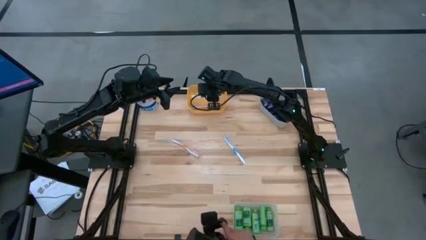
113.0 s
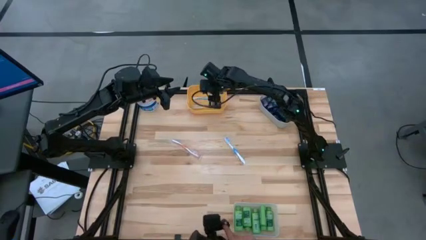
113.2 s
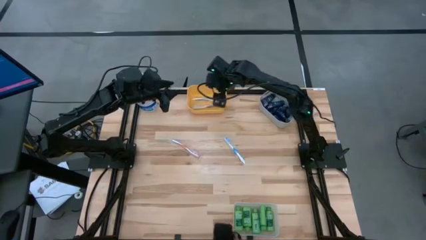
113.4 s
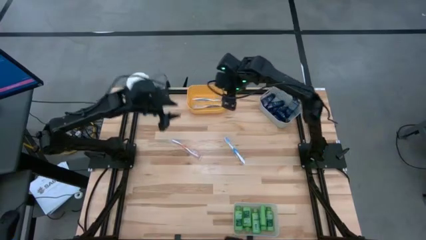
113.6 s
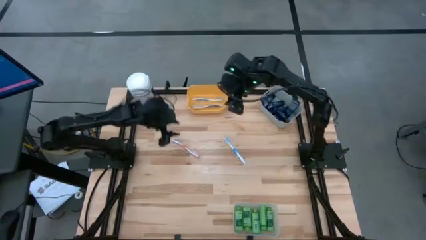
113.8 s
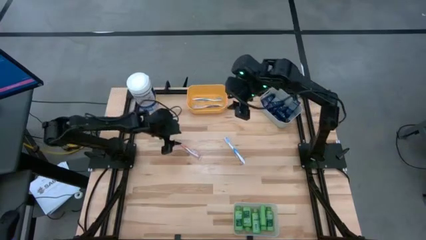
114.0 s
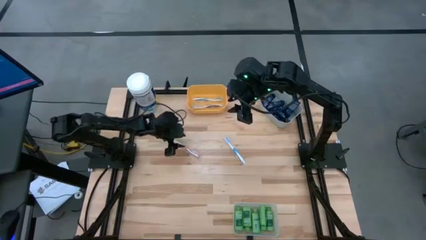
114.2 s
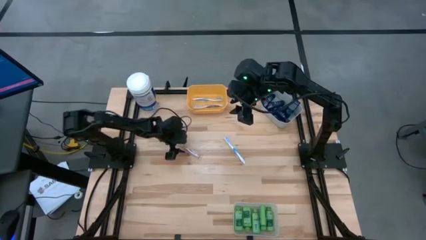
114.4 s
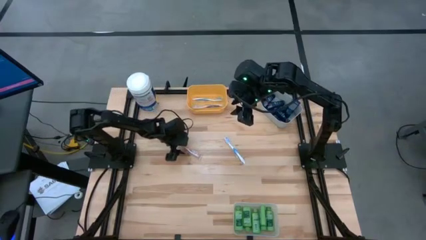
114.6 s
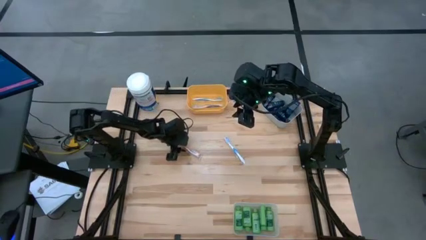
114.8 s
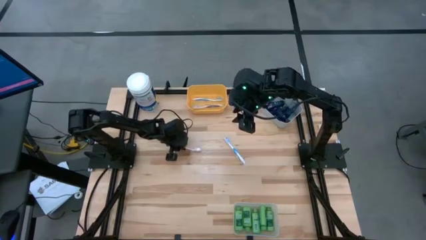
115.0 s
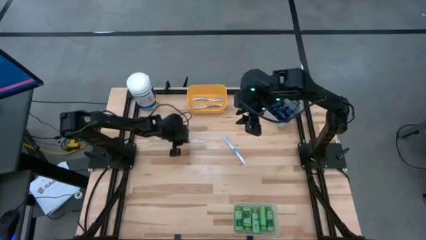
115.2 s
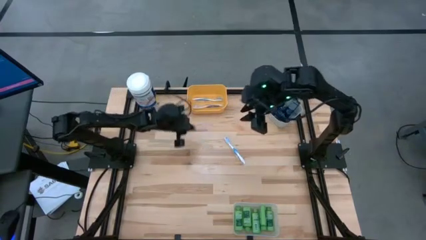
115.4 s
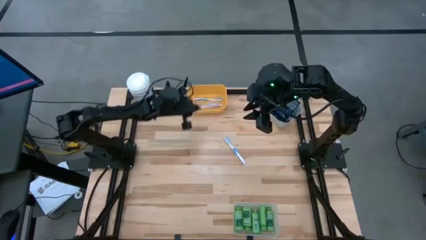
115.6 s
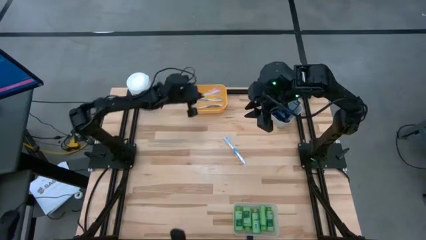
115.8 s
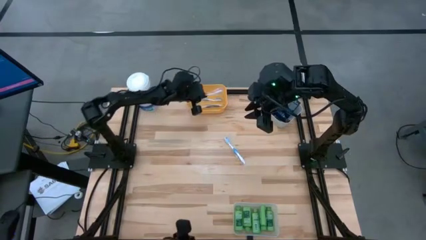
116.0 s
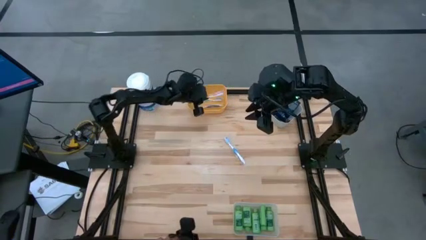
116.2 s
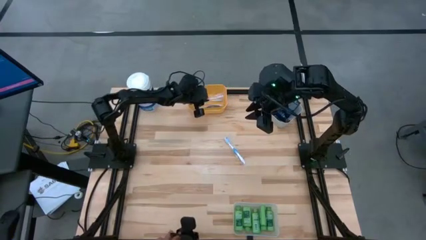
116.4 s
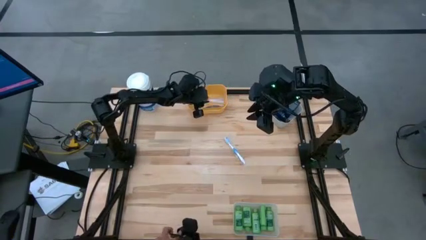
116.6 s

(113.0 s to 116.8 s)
Task: Pick & Place Travel size toiletries
Put the orange toothbrush into the yellow bin

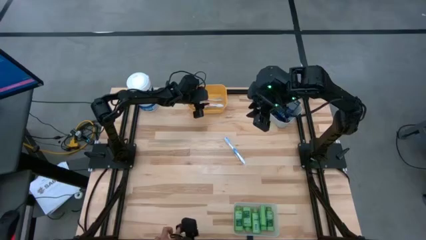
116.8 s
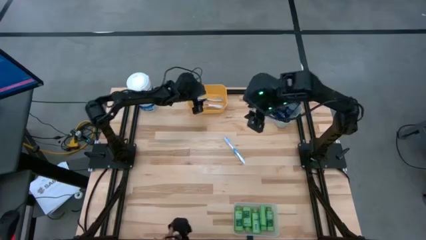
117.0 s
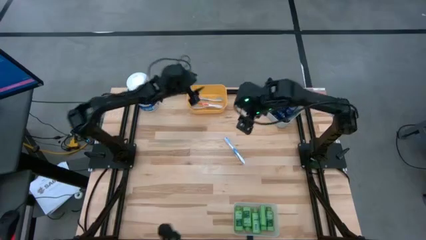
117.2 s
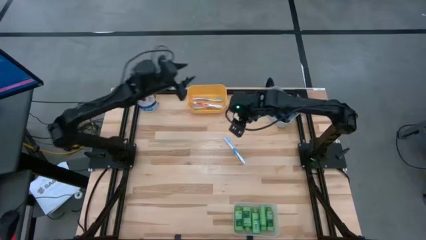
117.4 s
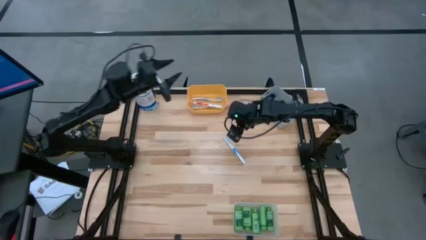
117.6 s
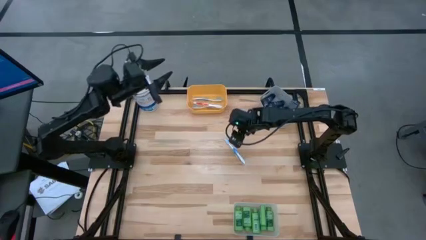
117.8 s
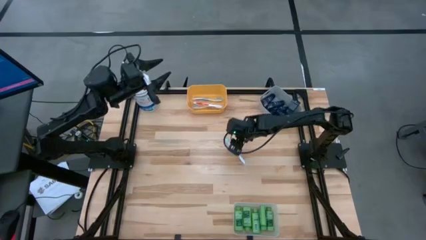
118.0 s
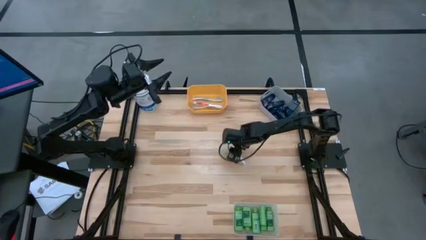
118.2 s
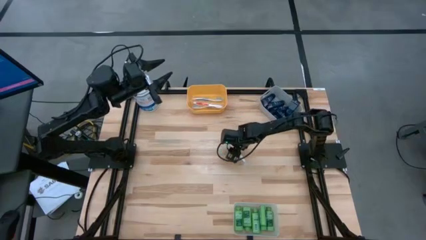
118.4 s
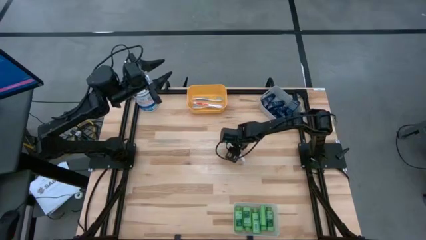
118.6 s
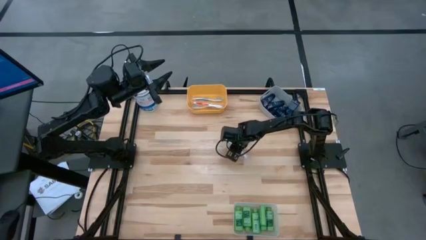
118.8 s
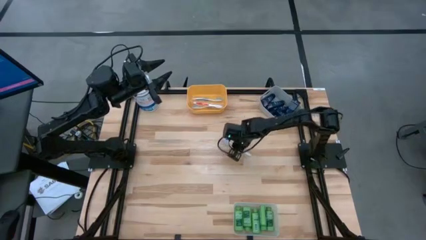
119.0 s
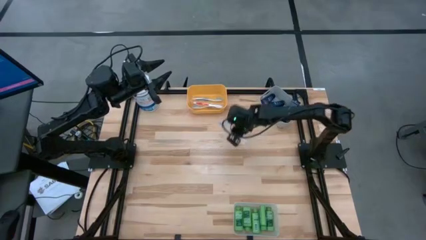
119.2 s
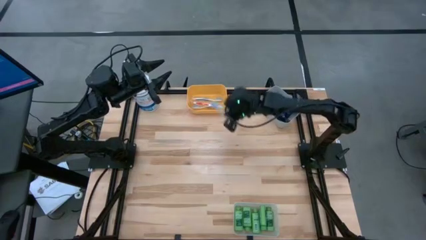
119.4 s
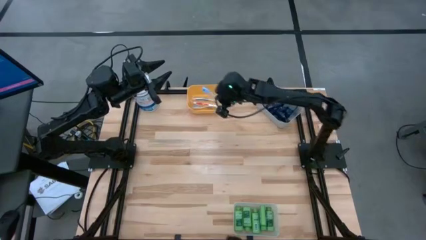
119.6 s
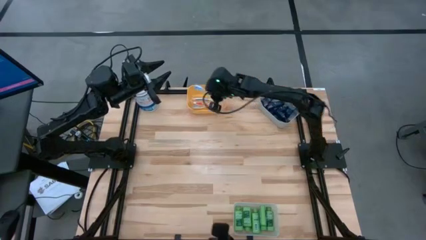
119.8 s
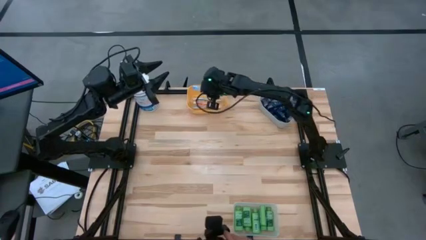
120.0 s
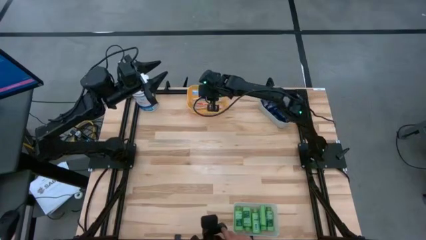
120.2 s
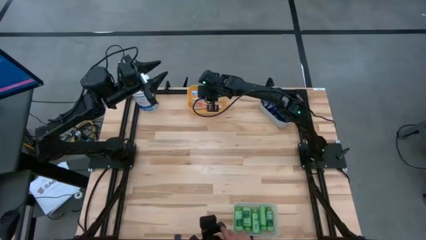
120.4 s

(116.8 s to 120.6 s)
Put the blue toothbrush into the yellow bin

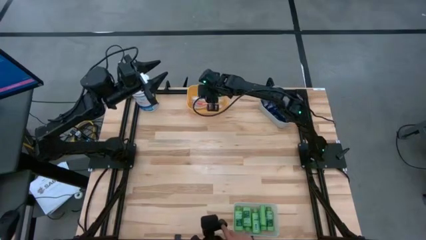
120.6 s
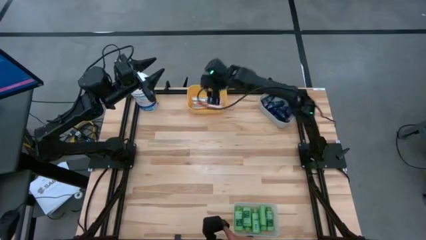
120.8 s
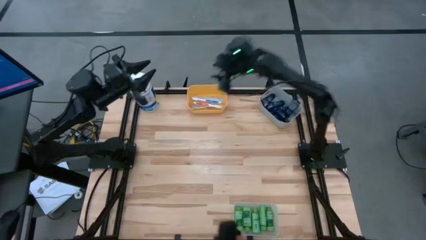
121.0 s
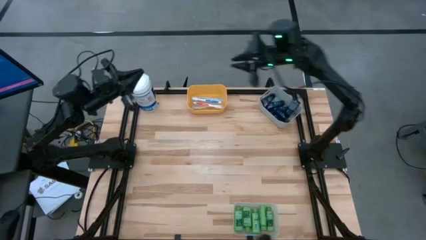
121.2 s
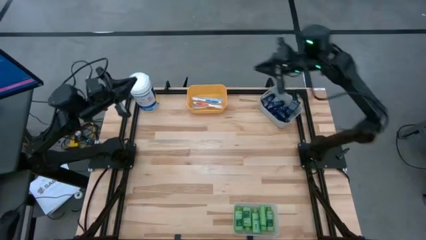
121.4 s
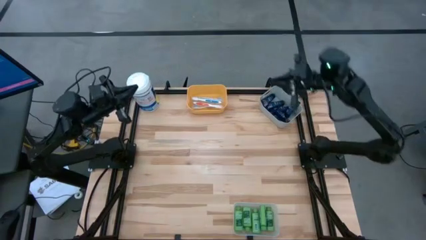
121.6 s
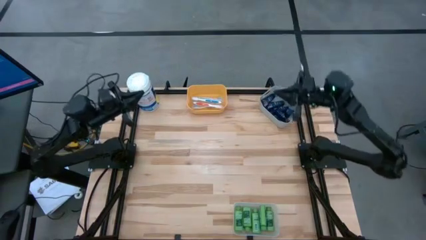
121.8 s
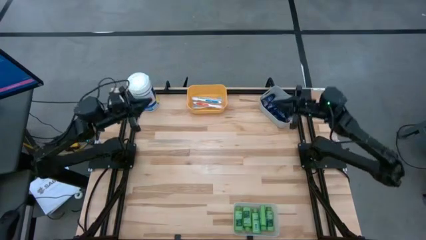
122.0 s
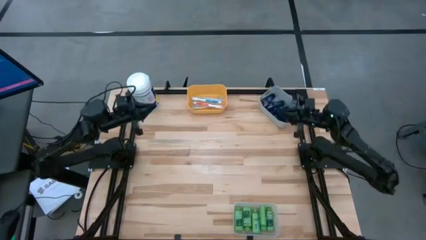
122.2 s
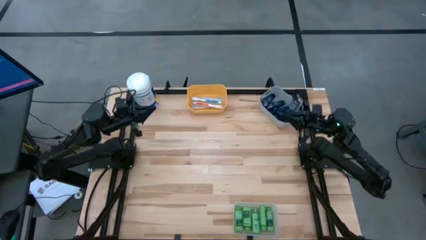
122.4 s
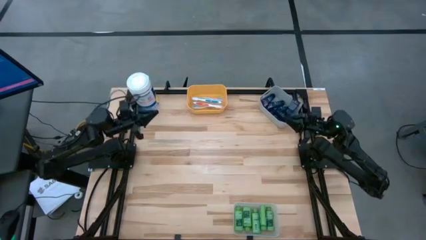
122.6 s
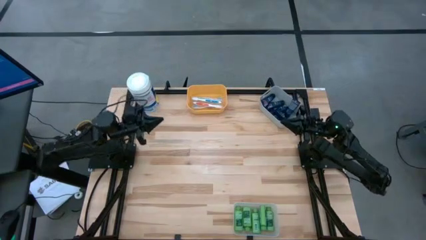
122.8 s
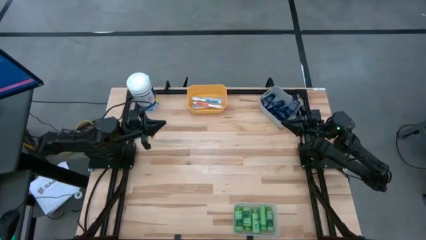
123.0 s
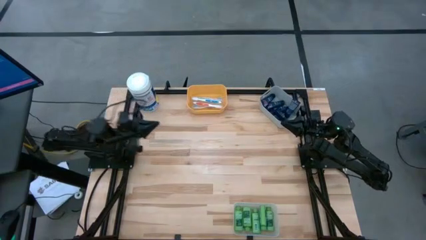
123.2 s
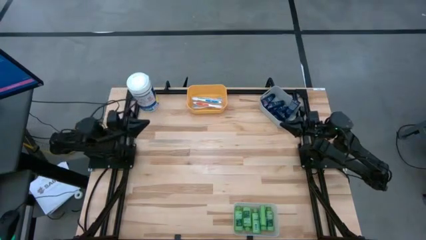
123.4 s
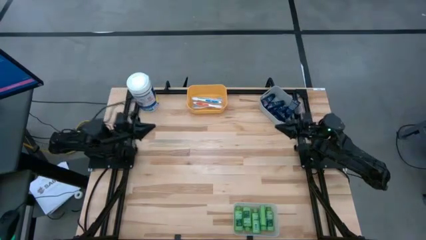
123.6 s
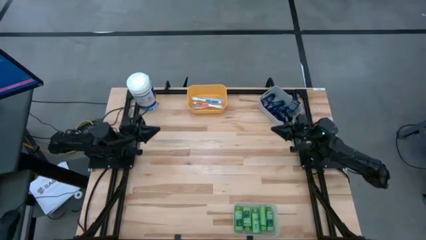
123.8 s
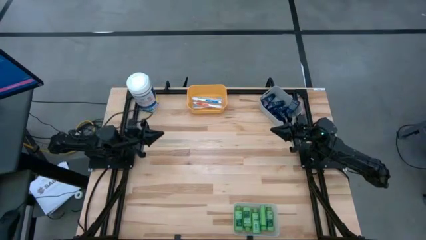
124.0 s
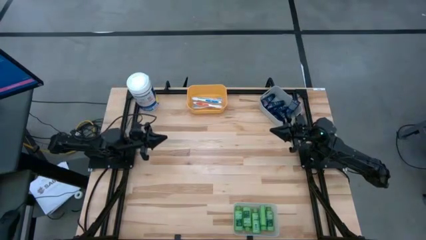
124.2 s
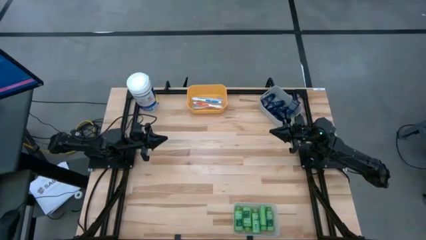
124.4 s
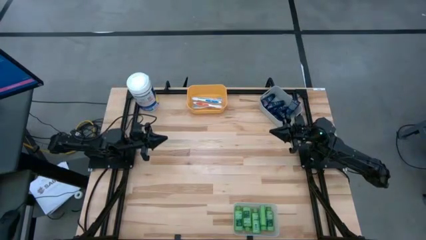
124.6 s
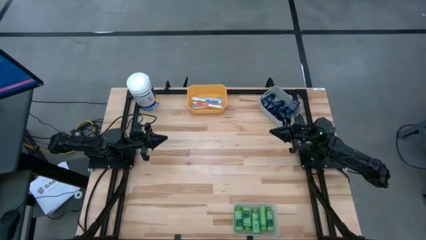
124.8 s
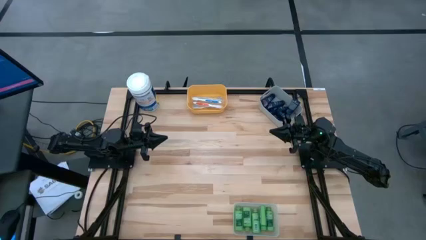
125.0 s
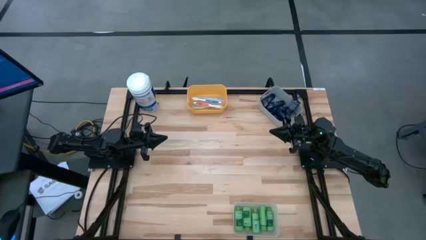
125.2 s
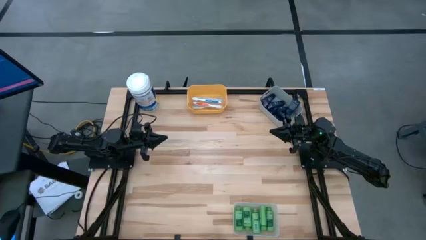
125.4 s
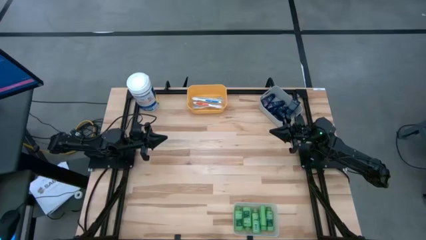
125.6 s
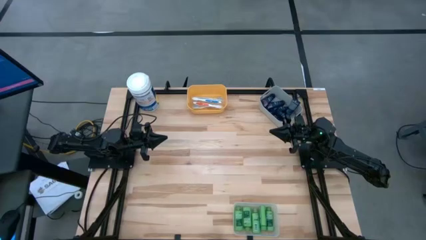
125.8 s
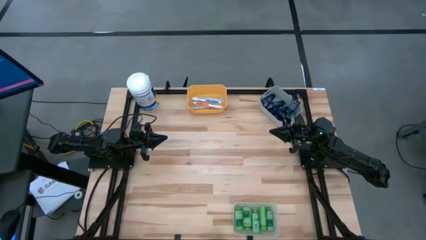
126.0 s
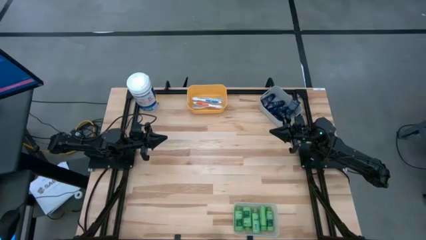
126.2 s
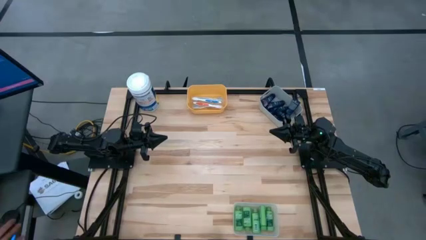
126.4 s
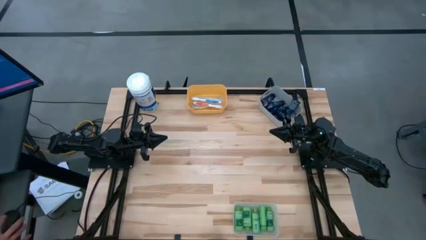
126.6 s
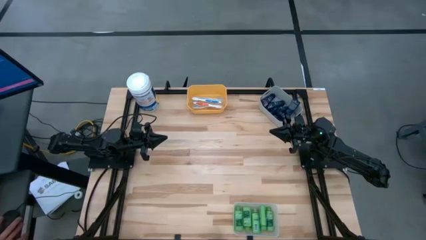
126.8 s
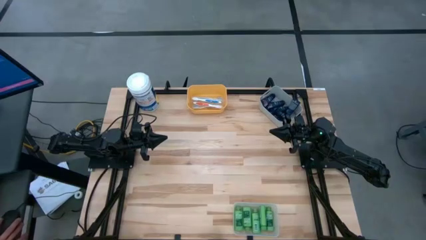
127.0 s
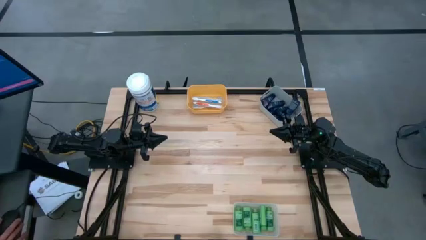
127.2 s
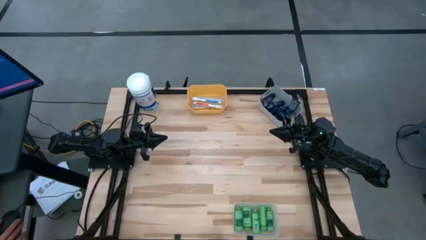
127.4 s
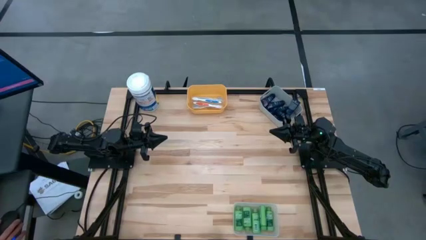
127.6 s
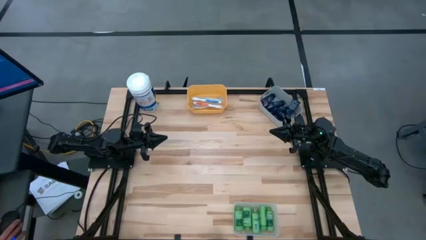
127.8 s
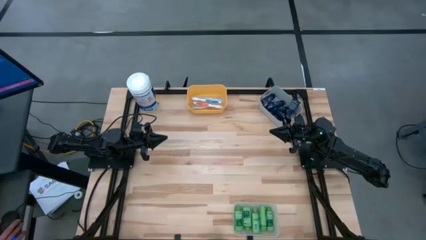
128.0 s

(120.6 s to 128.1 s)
Return to Home Position

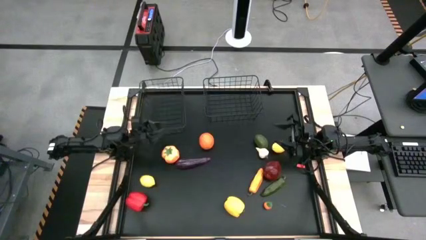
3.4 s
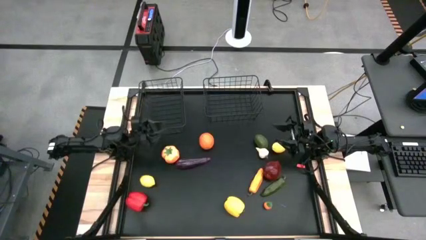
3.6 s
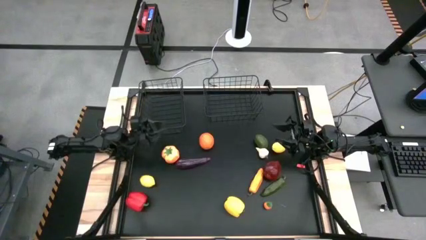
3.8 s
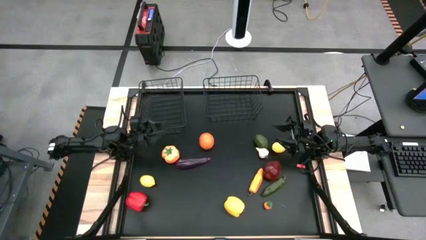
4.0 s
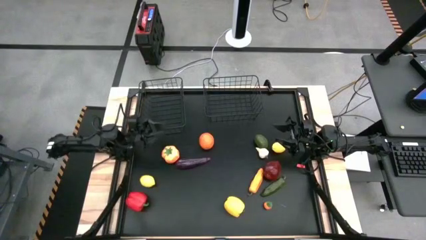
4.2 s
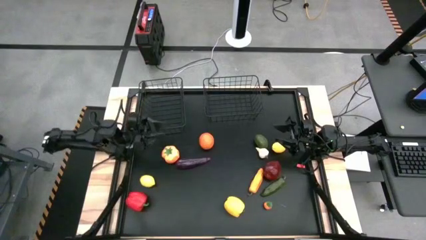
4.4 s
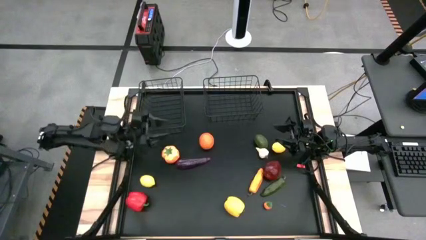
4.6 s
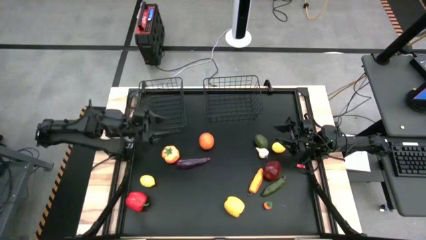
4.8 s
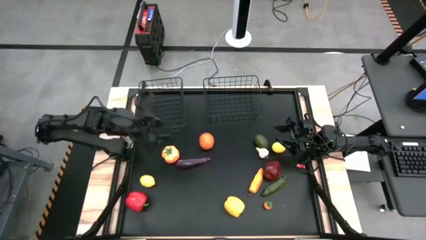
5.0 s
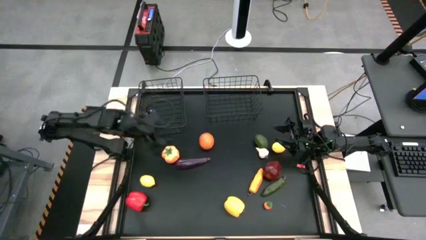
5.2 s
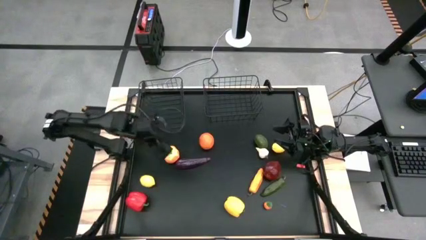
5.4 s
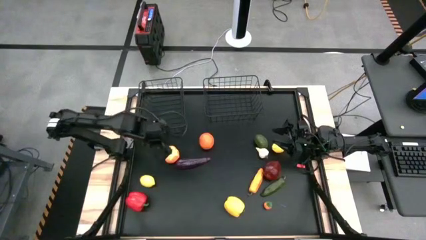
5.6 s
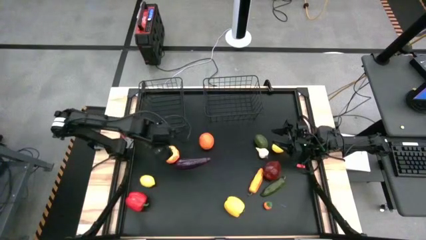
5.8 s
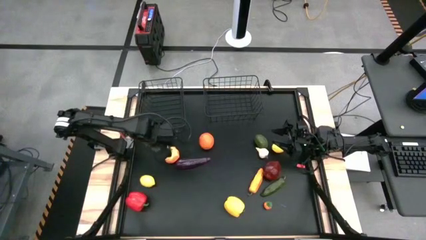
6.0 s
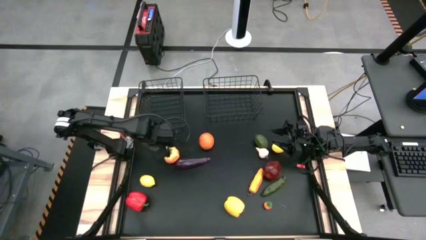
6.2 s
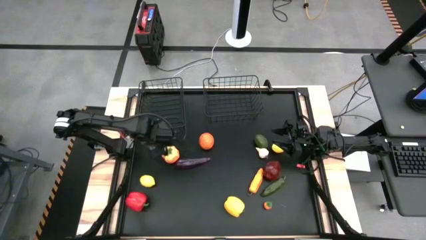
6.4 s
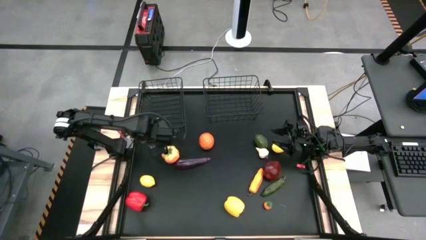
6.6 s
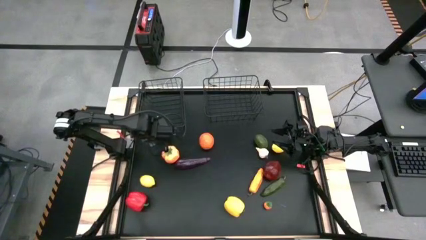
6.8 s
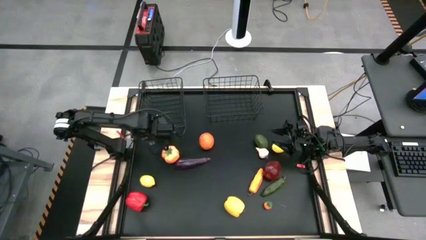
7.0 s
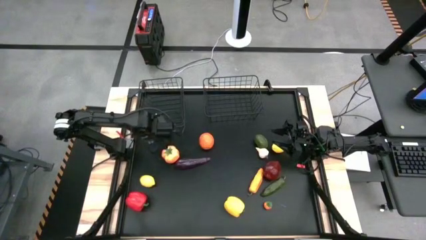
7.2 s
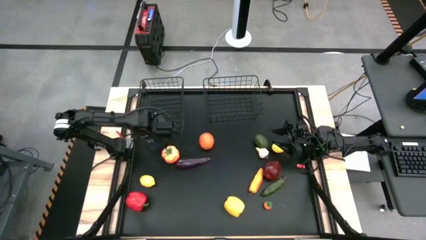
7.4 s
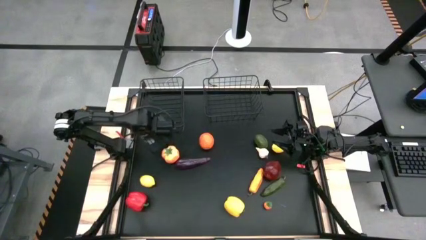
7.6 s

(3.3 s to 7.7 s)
Task: Sort produce into baskets
Adjust the black wire basket
